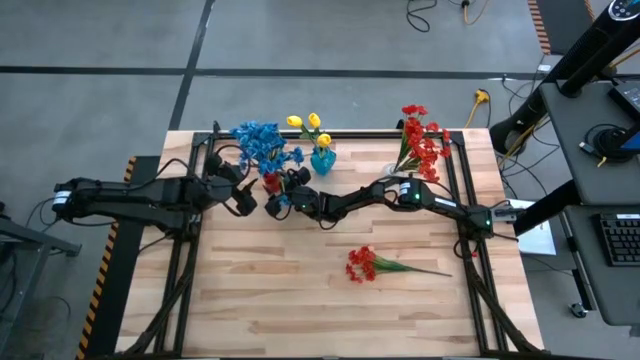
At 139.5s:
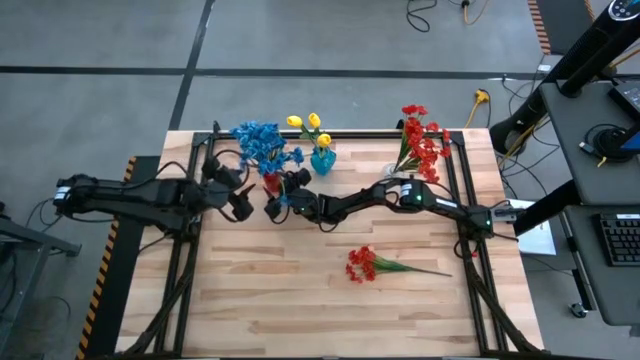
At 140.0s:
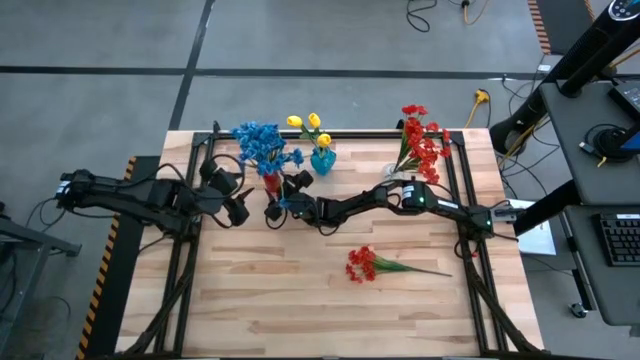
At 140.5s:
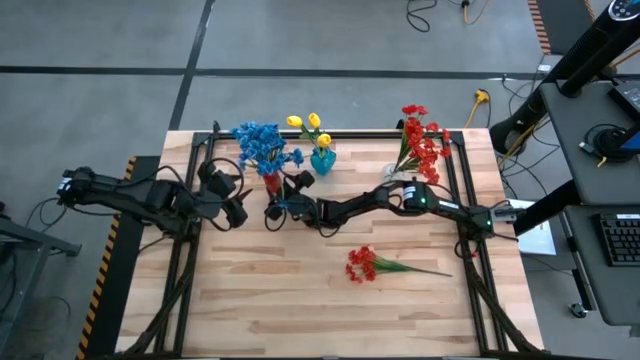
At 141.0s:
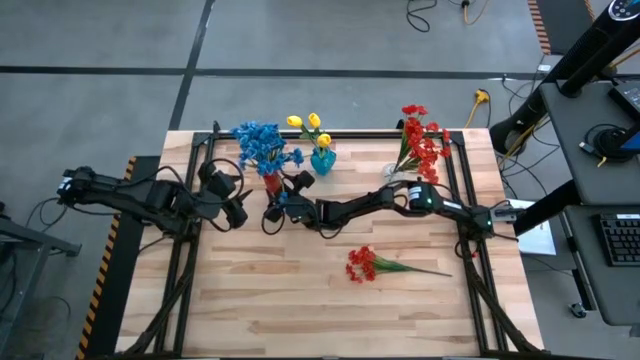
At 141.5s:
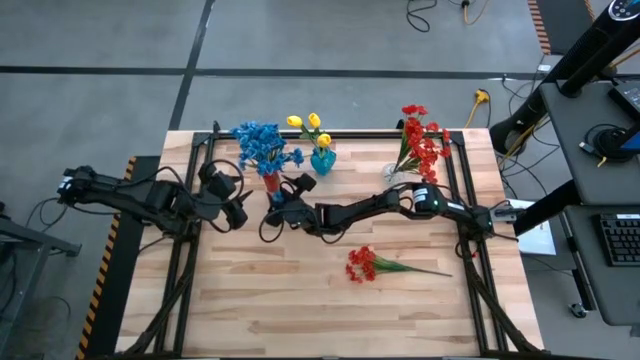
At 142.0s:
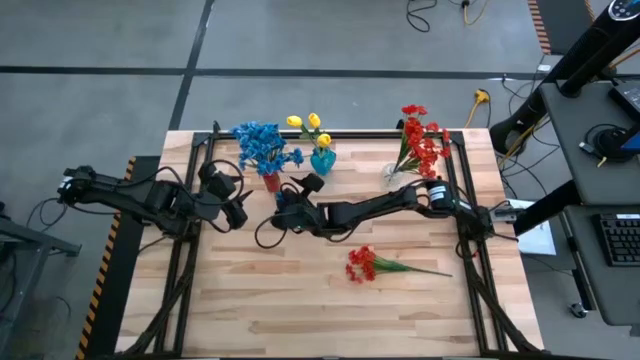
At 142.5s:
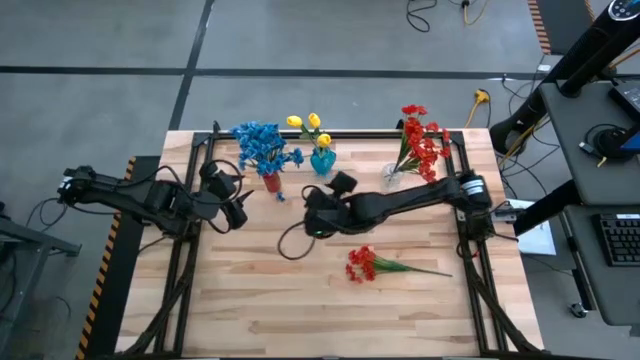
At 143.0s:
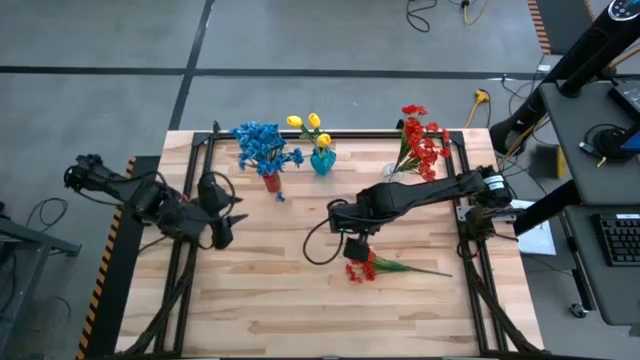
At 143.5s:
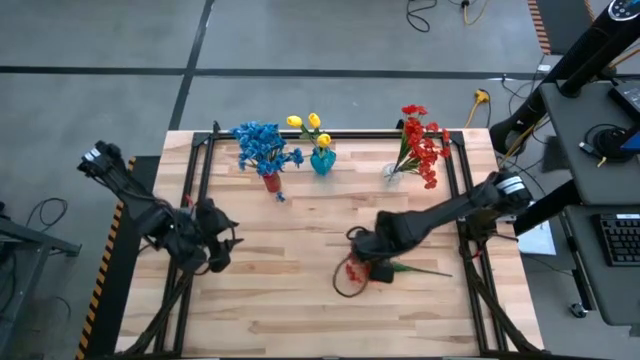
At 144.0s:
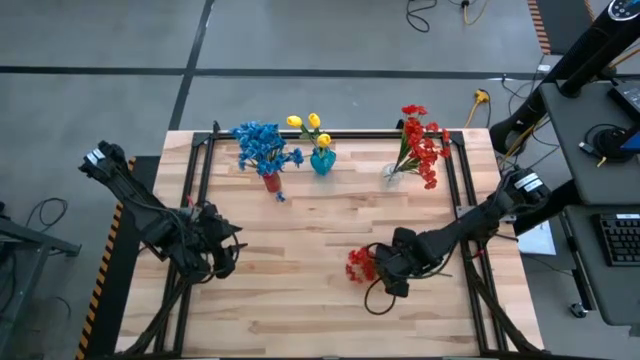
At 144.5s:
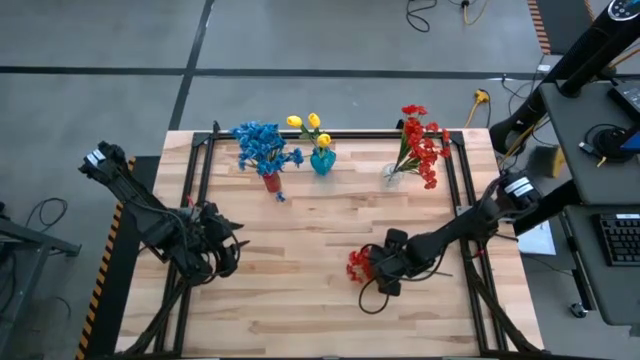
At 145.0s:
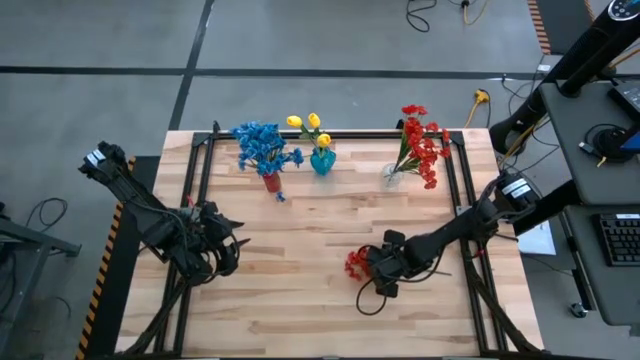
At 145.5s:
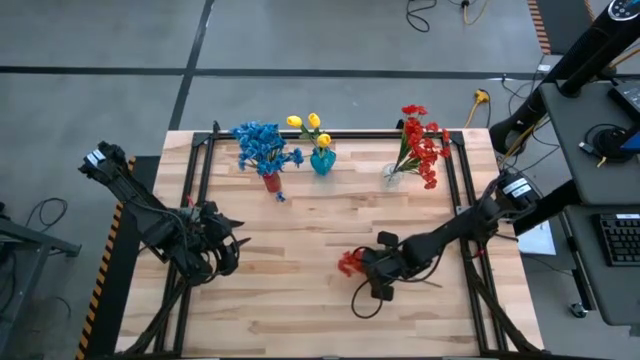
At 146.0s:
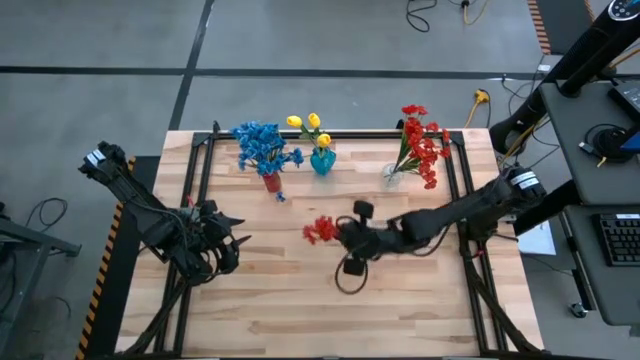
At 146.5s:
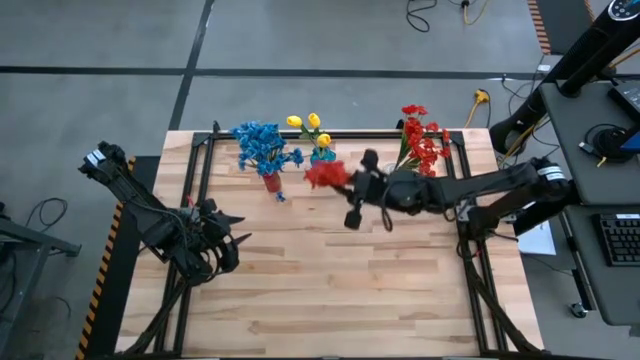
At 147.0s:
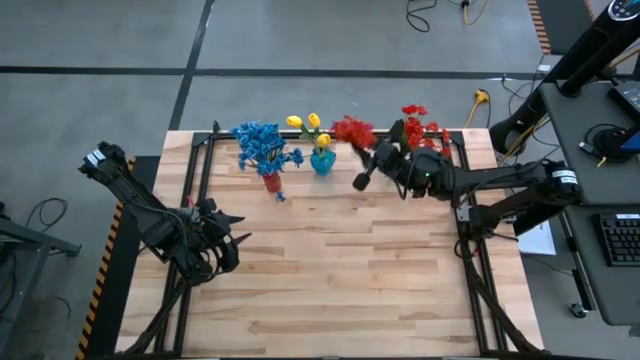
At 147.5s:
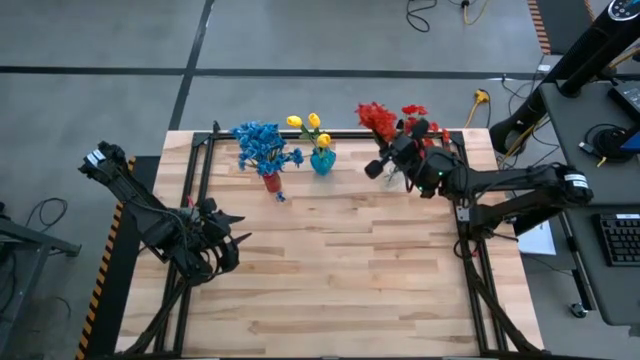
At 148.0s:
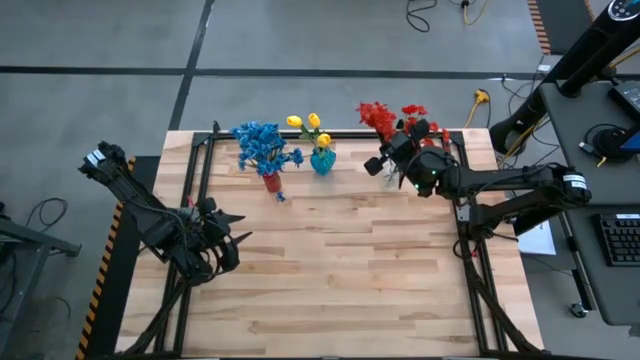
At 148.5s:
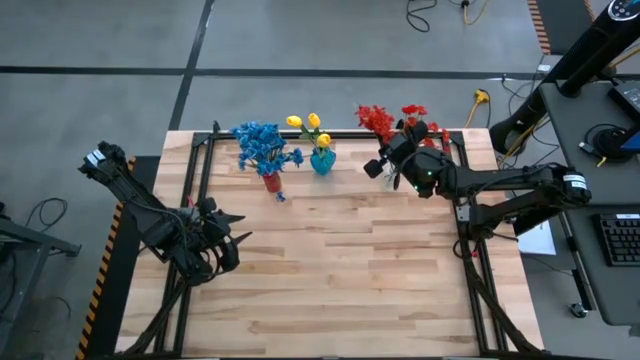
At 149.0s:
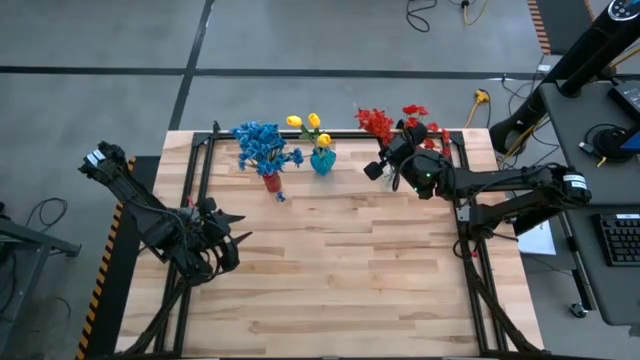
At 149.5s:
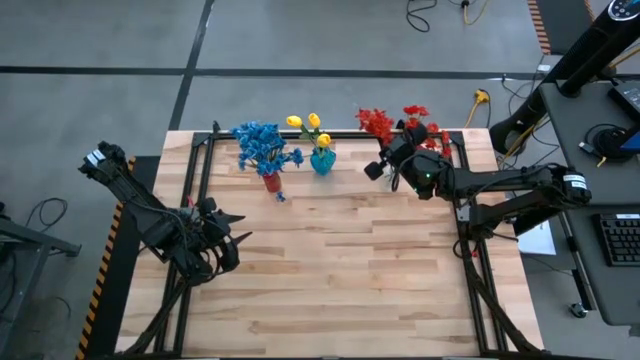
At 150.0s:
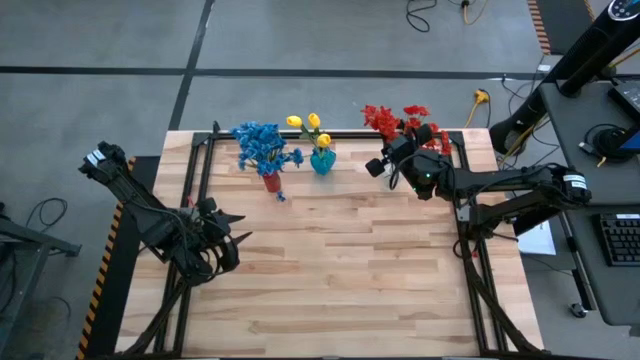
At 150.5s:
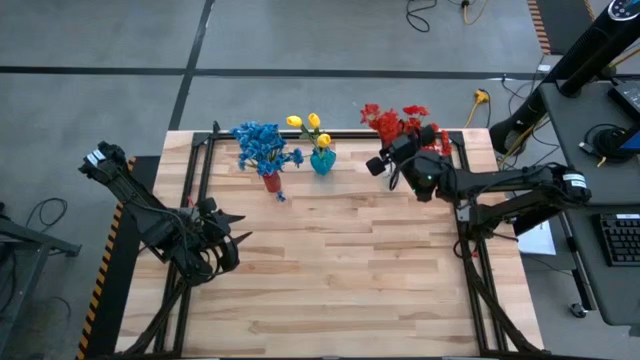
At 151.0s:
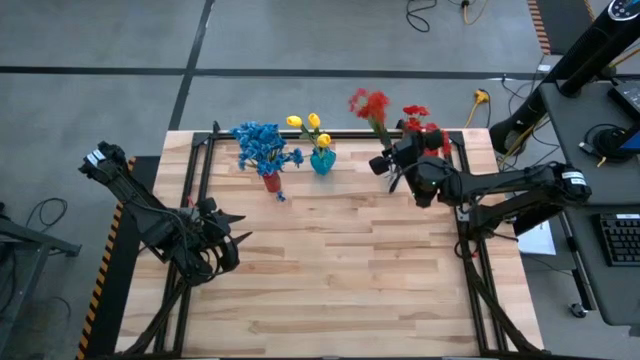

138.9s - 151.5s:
Task: Sort flowers into vase by color
Put the red flower into the transparent vase
